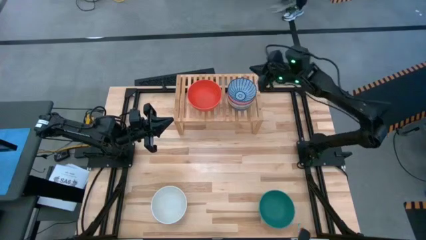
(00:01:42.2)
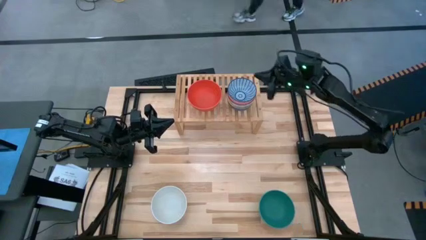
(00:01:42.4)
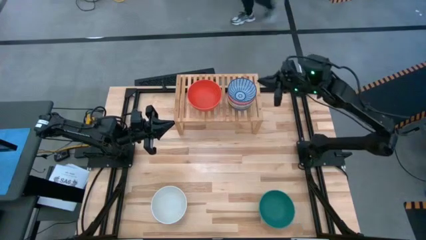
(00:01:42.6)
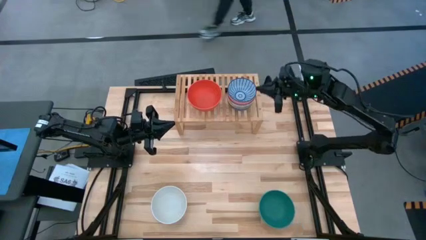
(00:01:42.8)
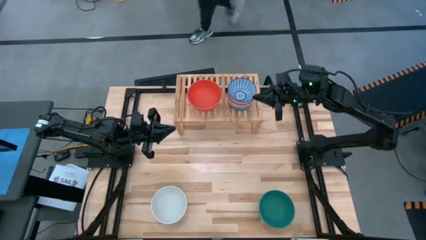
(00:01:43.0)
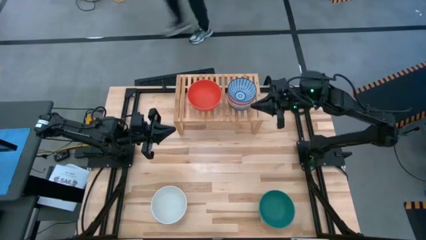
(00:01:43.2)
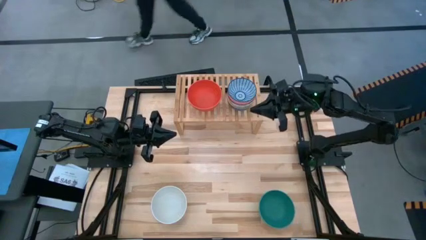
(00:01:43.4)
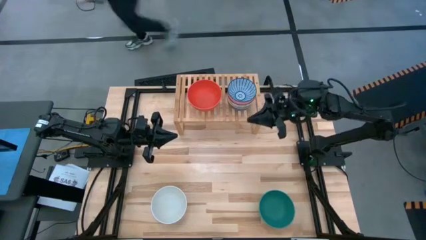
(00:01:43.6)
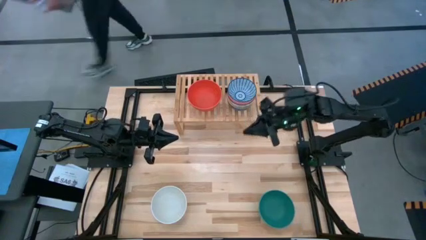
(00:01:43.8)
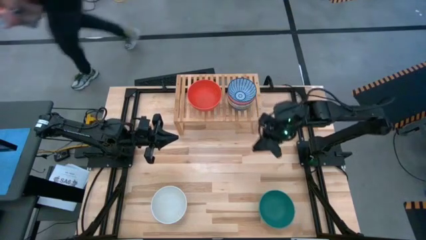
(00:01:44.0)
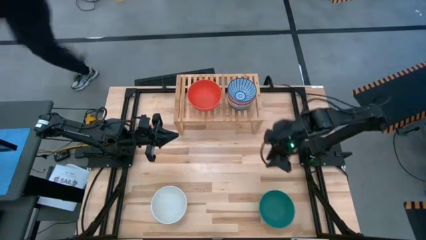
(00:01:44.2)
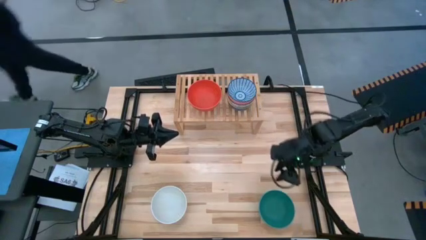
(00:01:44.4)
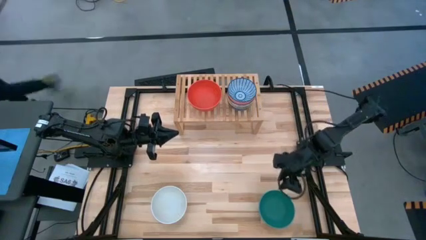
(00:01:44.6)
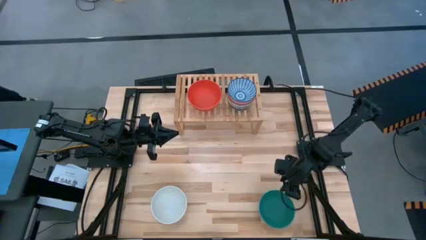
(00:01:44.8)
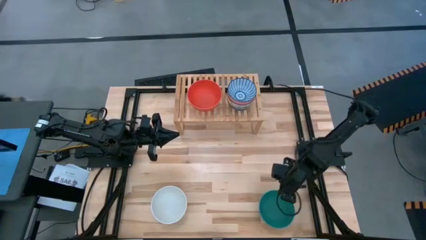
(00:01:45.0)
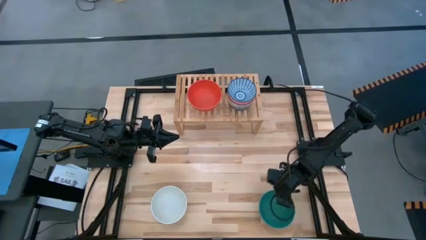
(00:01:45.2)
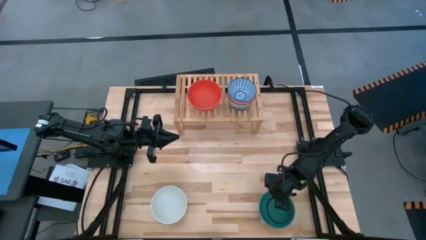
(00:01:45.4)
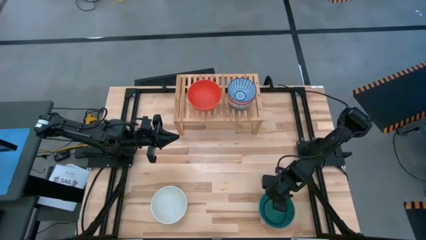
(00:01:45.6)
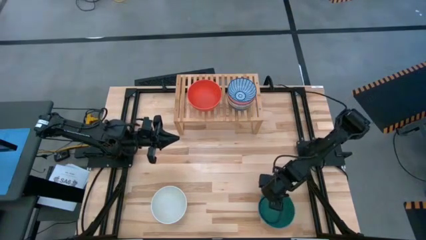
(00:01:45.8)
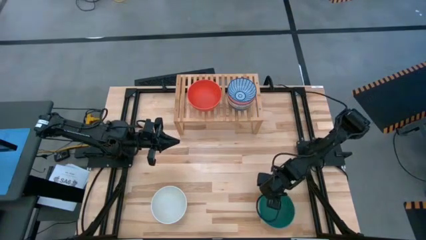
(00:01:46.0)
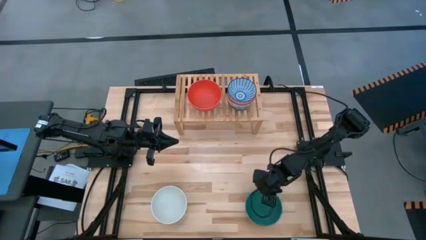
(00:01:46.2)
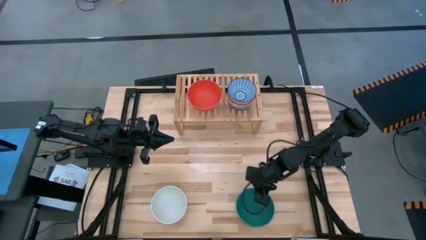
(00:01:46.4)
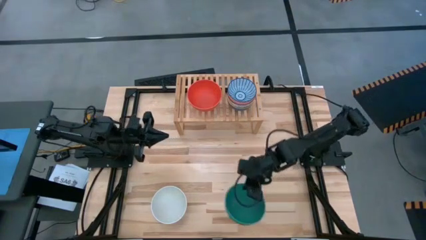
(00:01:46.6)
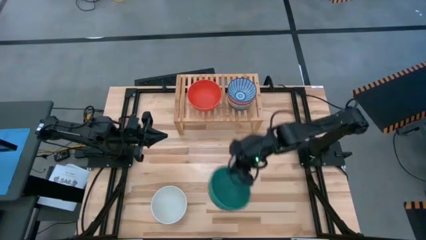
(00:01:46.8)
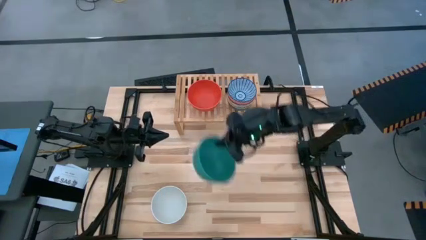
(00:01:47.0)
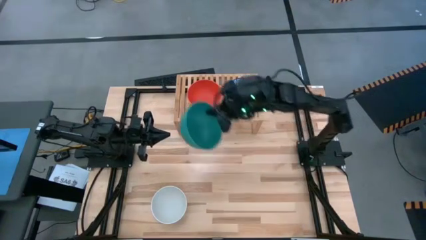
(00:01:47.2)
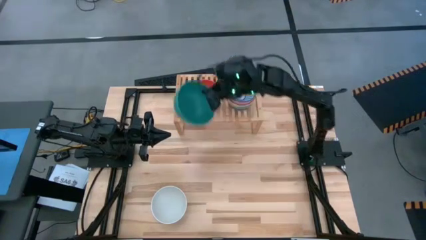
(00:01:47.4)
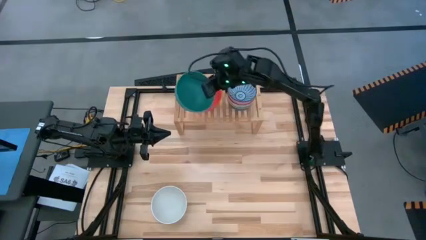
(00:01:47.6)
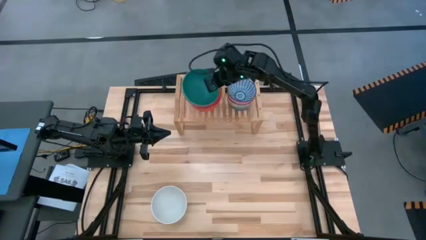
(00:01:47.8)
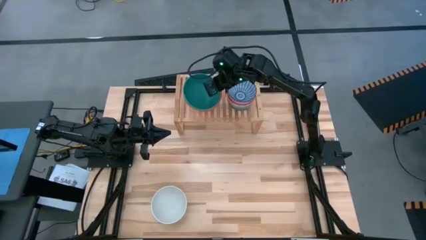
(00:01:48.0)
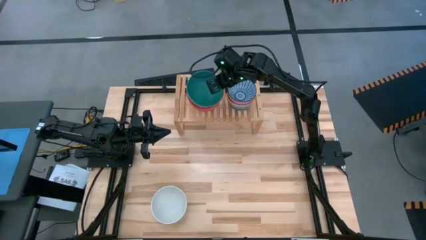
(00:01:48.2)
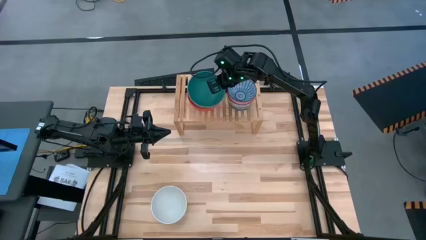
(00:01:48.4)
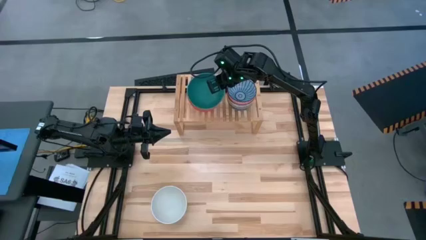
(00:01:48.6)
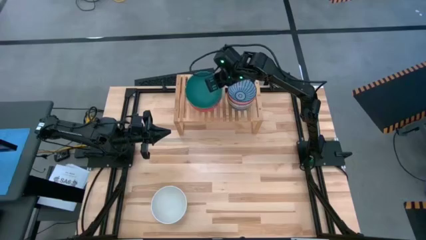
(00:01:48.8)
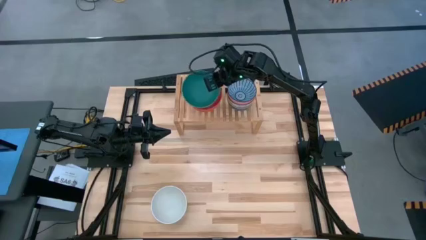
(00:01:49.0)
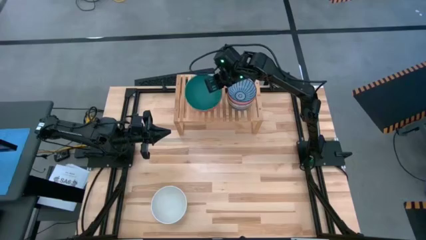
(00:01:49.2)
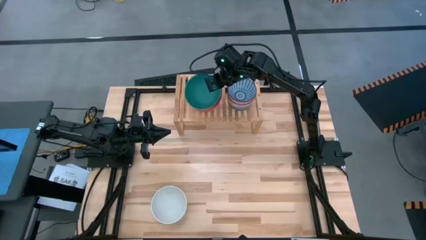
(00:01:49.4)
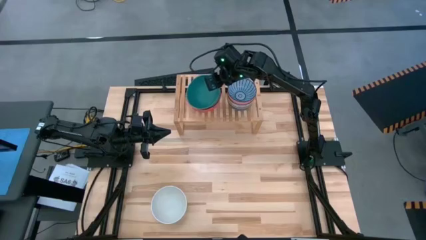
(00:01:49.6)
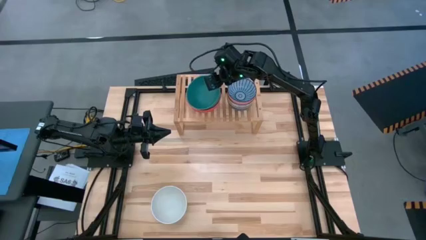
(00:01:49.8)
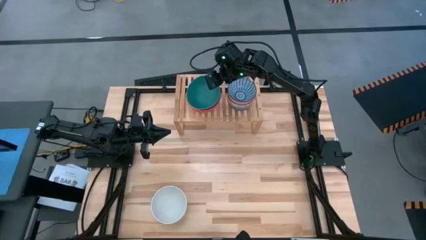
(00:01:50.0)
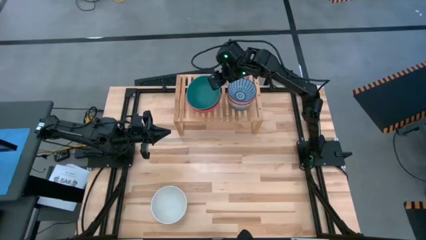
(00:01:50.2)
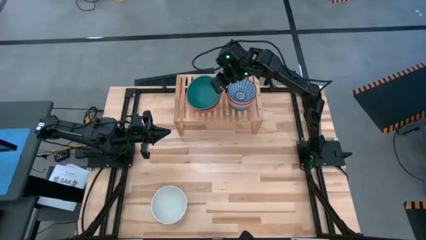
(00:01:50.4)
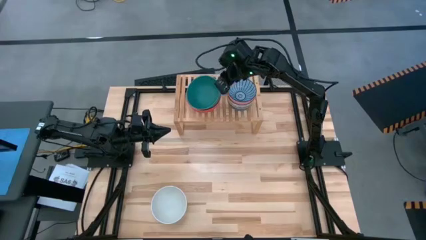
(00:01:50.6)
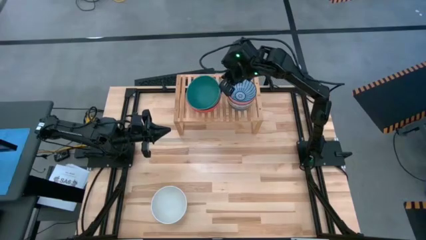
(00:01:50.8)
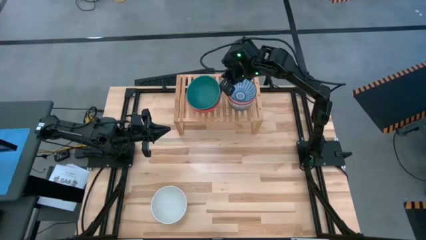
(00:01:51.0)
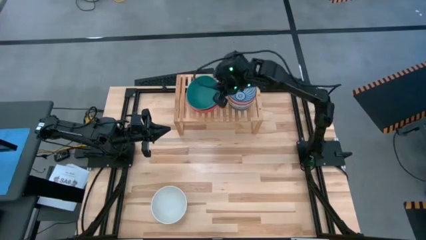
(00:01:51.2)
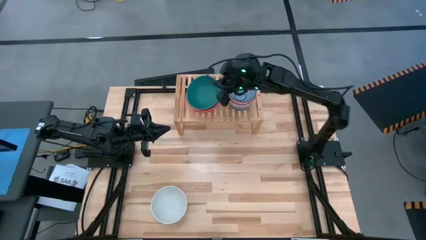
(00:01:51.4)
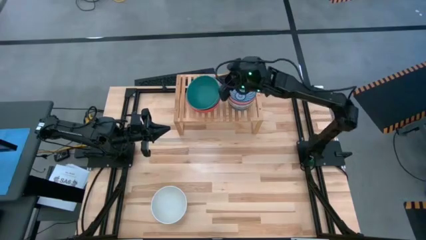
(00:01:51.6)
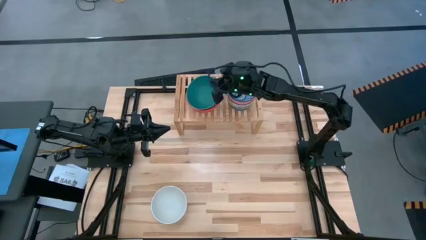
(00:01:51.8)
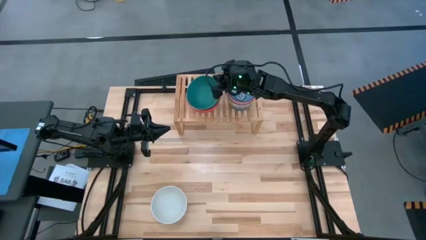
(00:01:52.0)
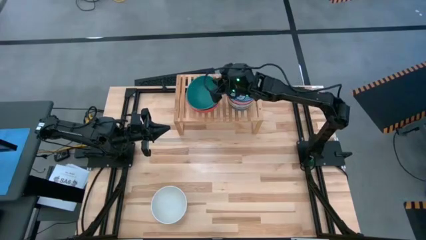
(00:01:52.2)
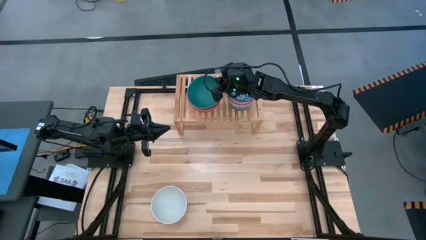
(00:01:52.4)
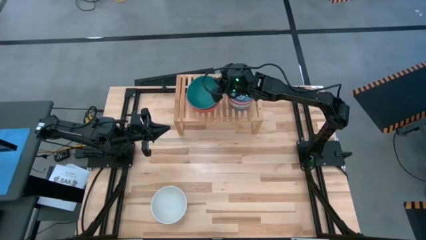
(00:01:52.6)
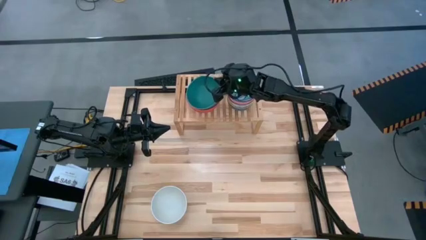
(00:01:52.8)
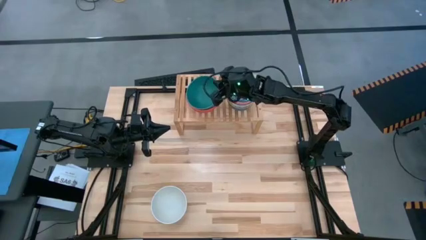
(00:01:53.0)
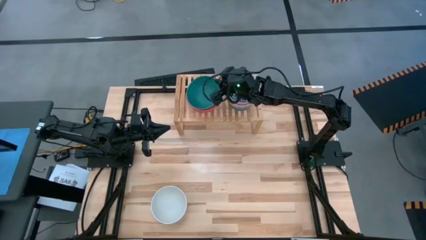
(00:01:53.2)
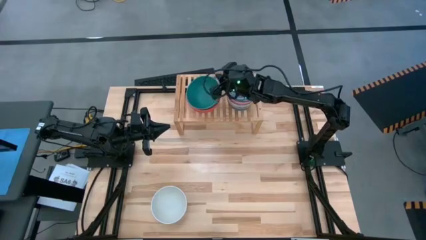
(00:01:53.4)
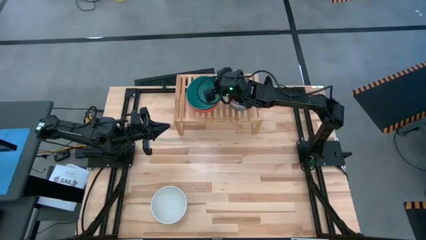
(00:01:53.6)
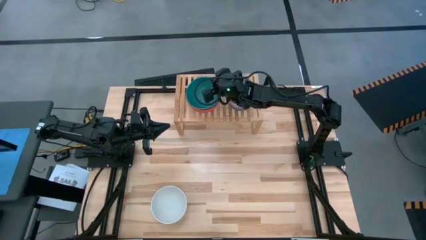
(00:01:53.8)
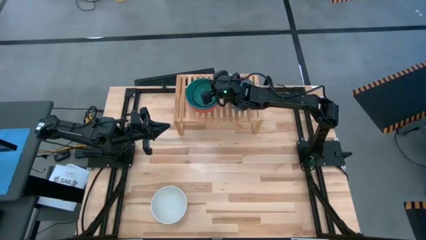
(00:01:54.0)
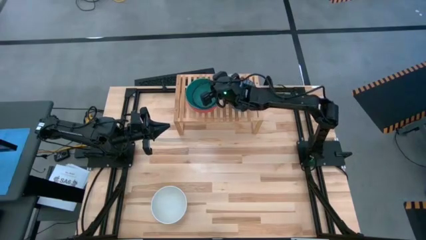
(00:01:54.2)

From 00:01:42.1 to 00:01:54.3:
Task: Place and stack bowls onto a shelf
Stack the big dark blue bowl on top of the other big orange bowl on the shelf

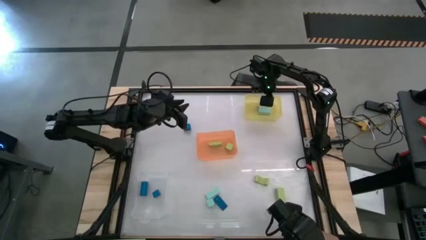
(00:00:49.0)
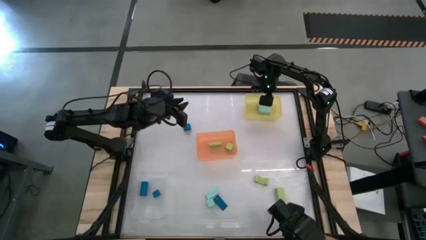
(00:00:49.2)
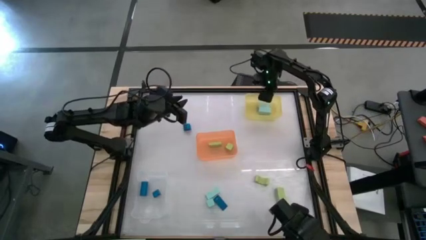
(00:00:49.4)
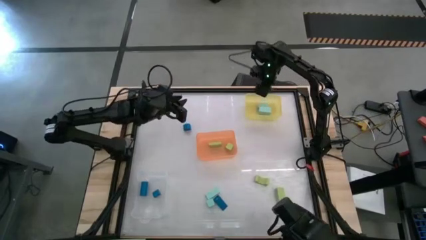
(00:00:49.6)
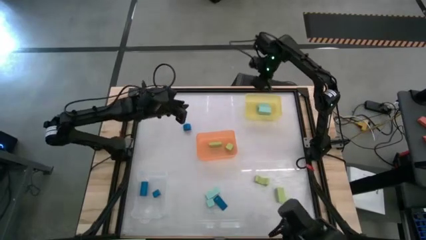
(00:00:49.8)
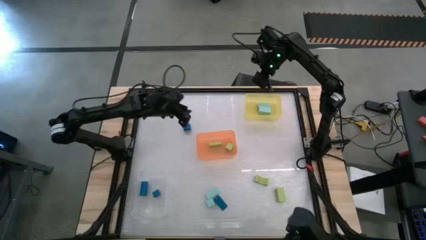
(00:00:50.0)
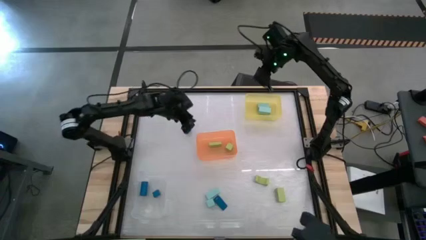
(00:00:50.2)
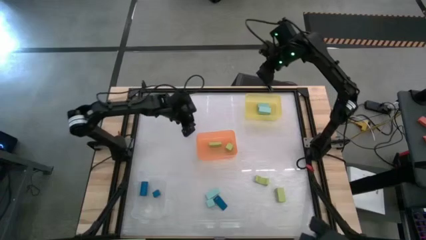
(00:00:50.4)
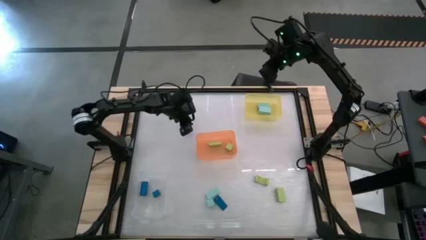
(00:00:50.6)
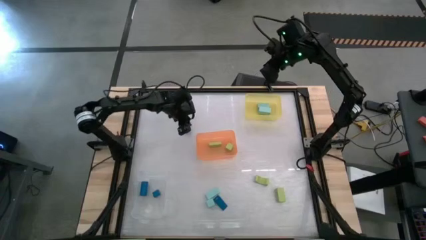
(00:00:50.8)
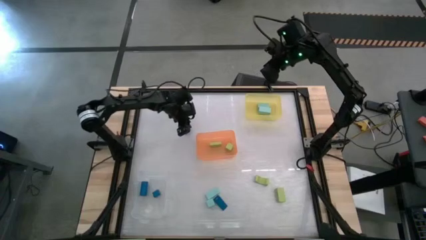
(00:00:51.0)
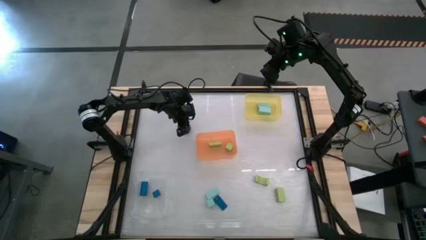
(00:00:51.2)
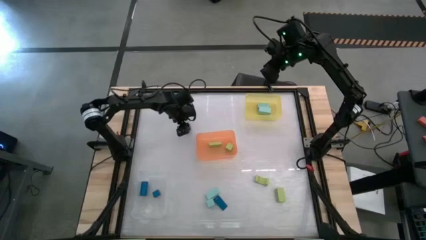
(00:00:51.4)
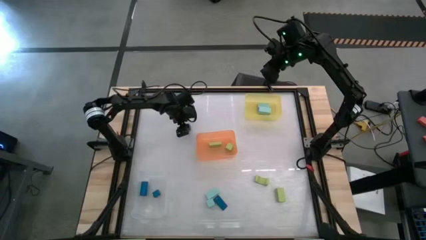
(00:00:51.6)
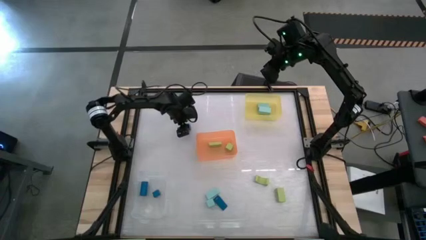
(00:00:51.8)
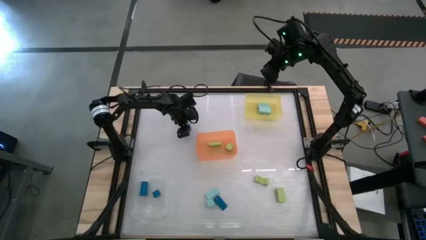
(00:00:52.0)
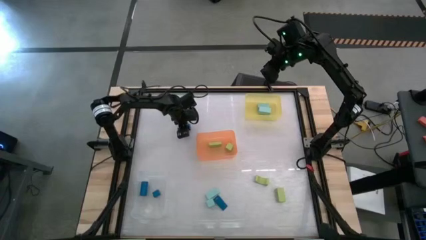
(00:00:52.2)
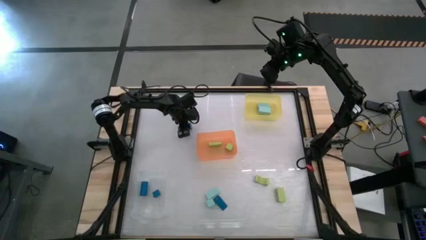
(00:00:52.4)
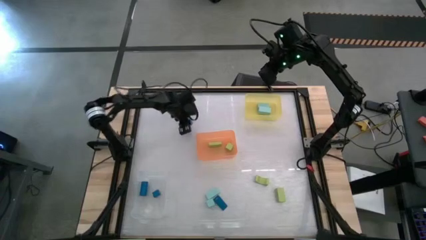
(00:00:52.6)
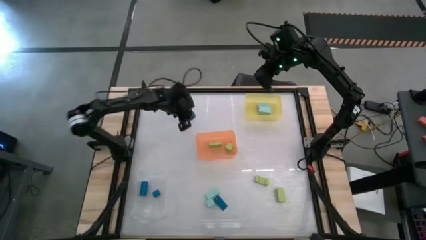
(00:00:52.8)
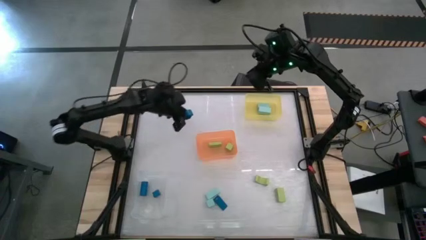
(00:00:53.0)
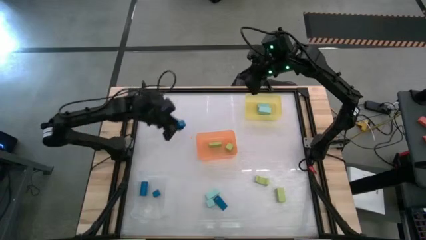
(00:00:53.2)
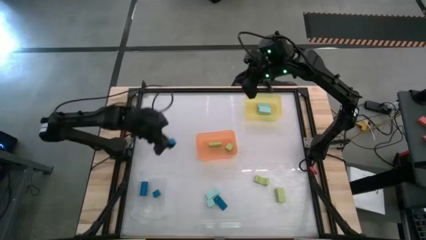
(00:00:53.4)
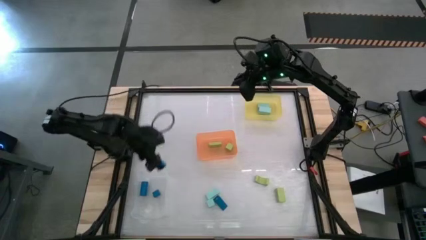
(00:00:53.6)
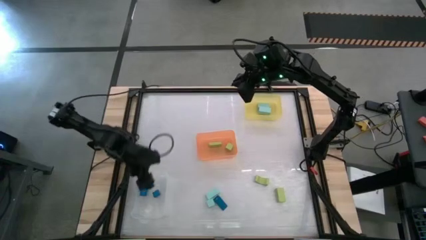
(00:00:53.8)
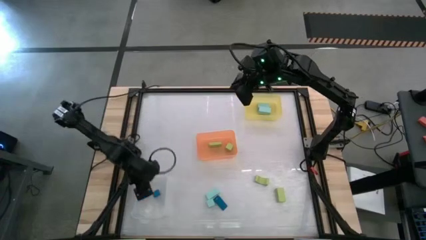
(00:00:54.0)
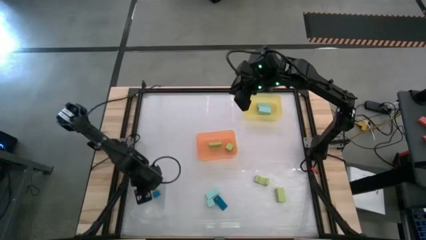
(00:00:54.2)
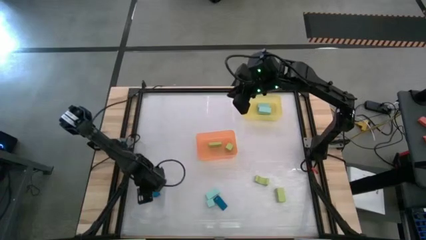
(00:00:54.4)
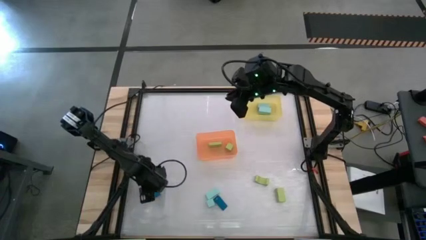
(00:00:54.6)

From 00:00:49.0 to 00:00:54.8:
Task: Sort & place blocks by color
Put the blue block into the transparent bin
